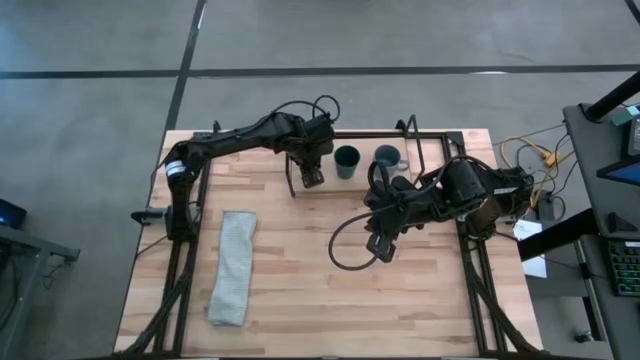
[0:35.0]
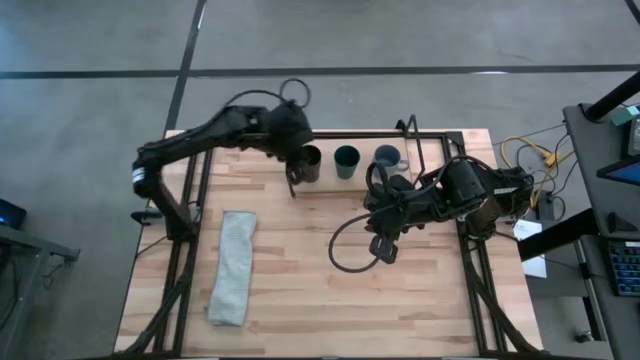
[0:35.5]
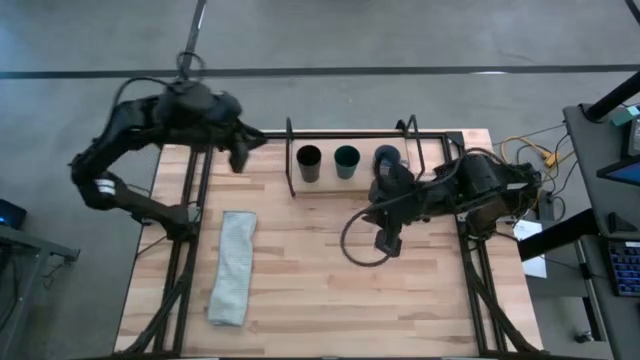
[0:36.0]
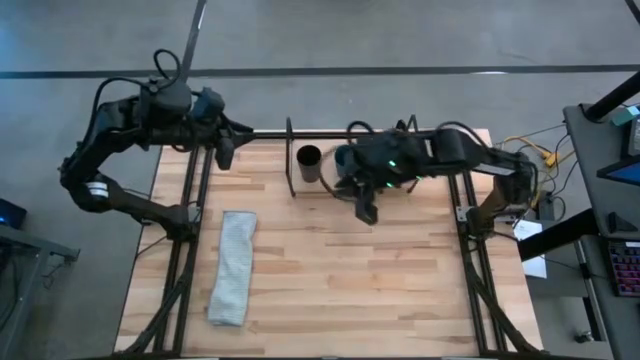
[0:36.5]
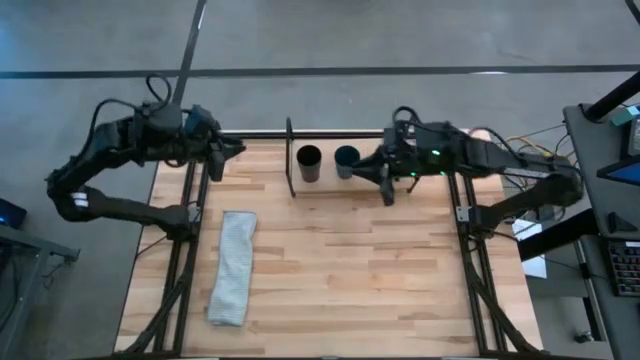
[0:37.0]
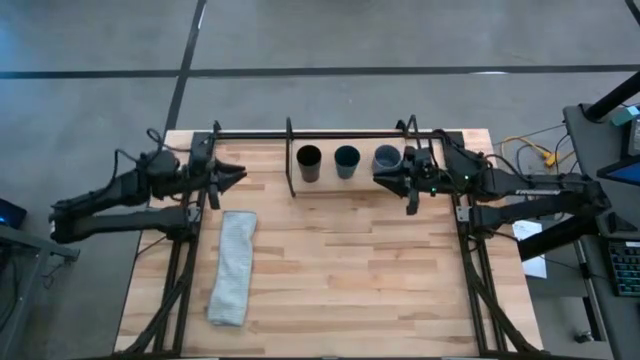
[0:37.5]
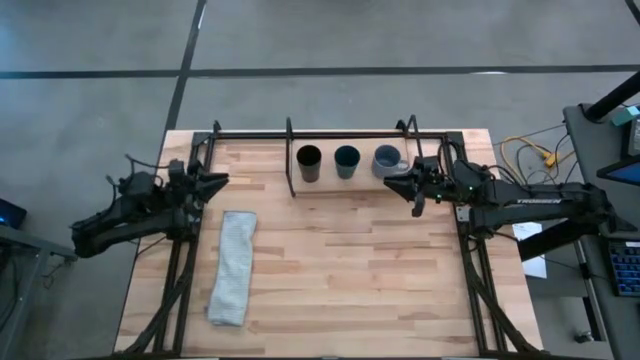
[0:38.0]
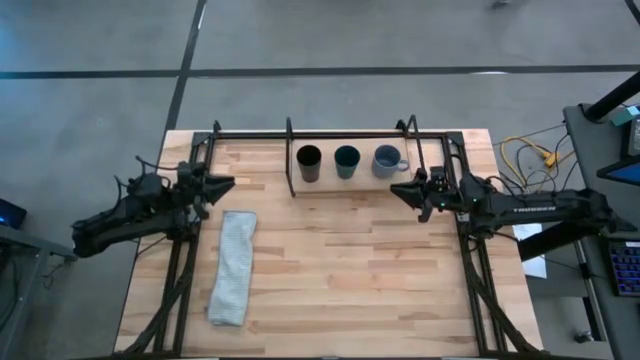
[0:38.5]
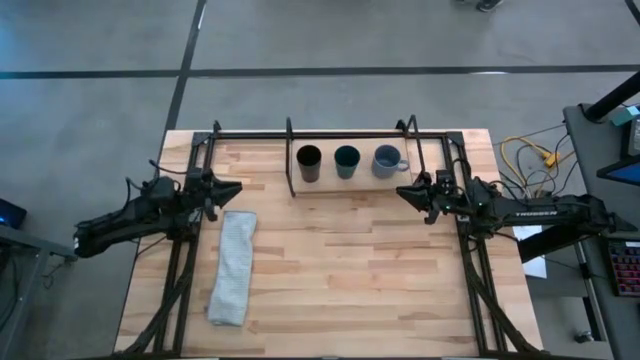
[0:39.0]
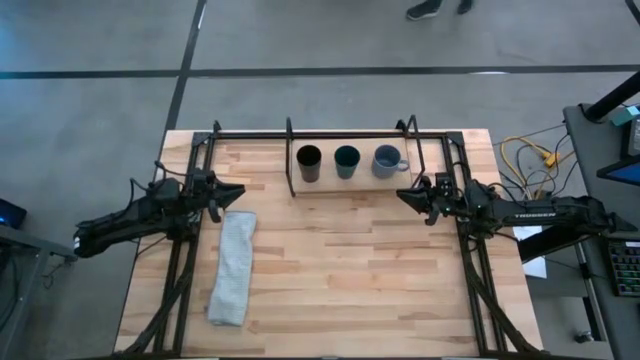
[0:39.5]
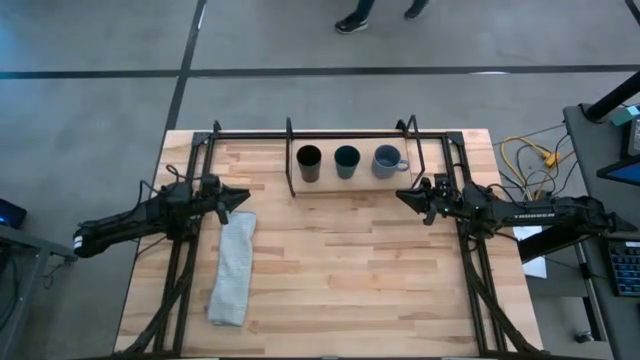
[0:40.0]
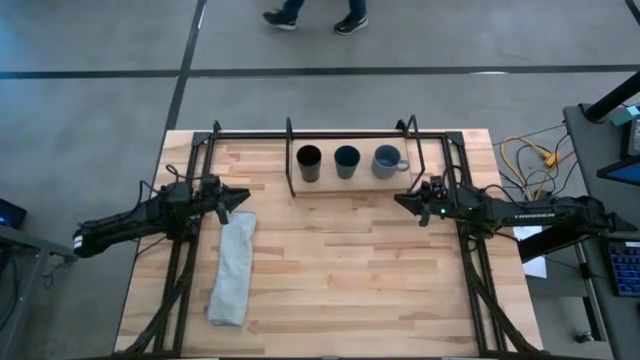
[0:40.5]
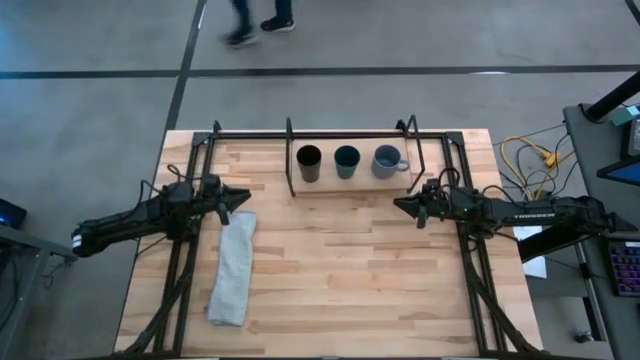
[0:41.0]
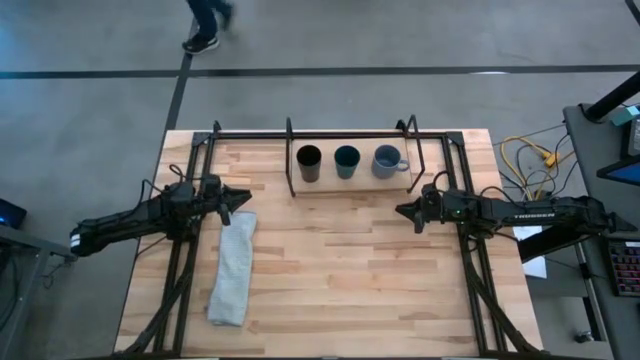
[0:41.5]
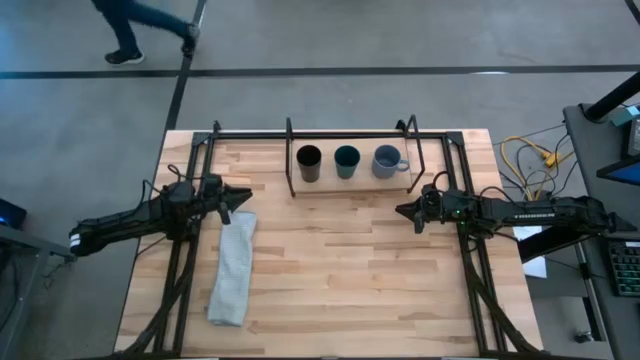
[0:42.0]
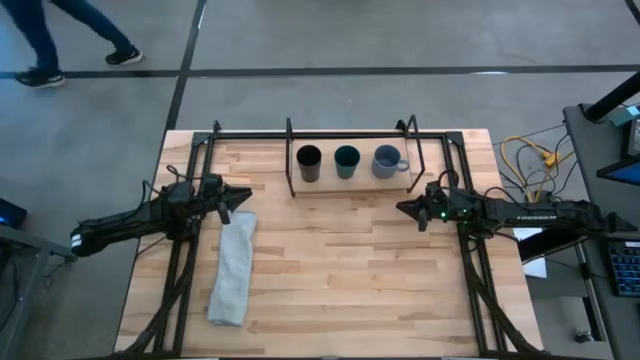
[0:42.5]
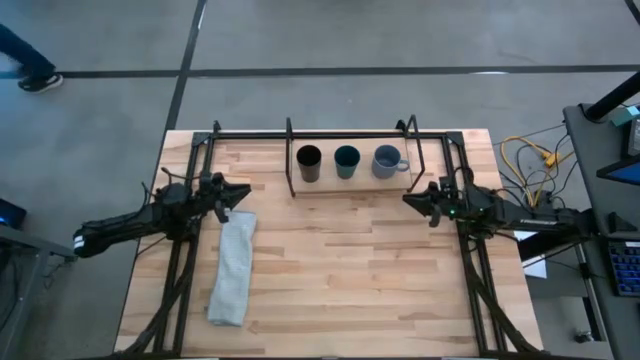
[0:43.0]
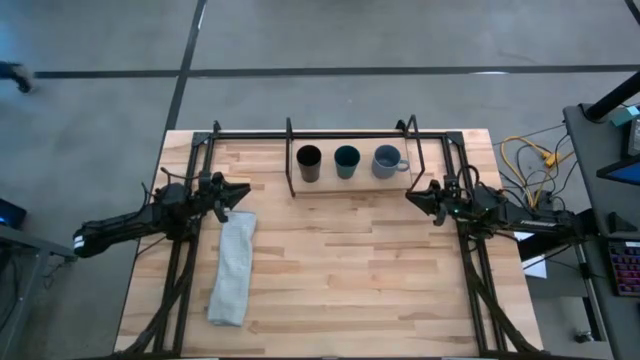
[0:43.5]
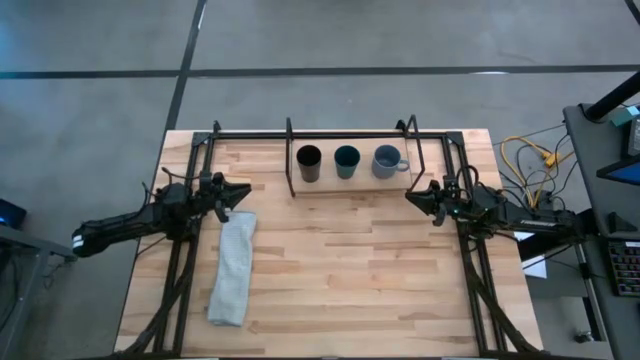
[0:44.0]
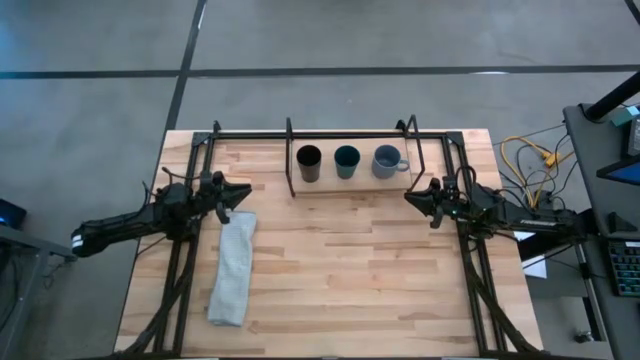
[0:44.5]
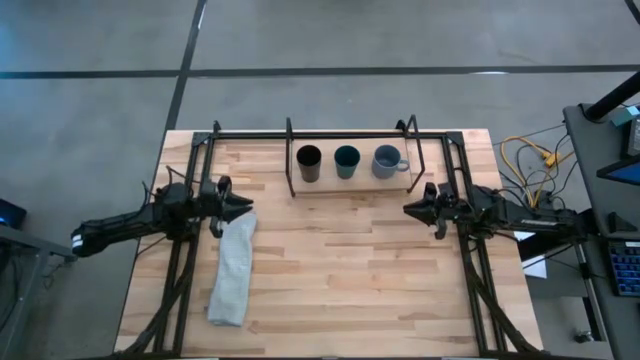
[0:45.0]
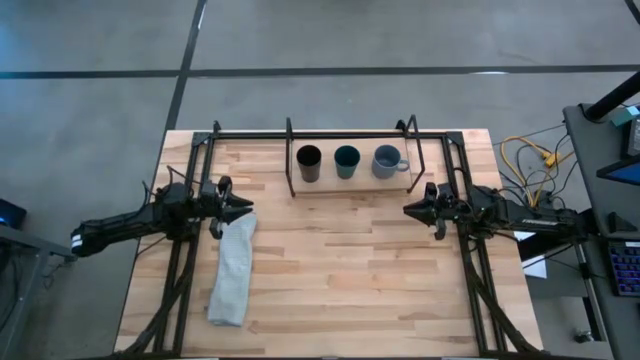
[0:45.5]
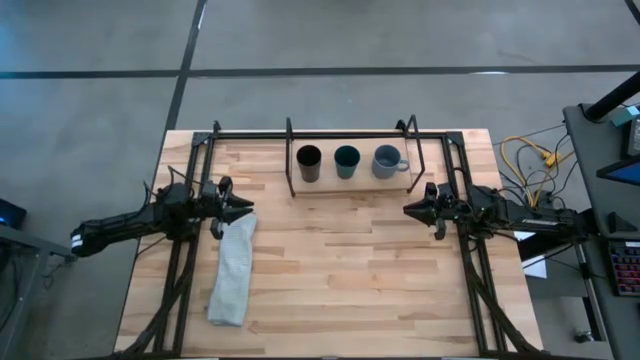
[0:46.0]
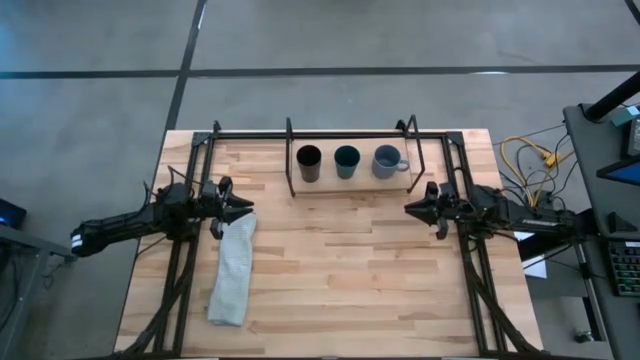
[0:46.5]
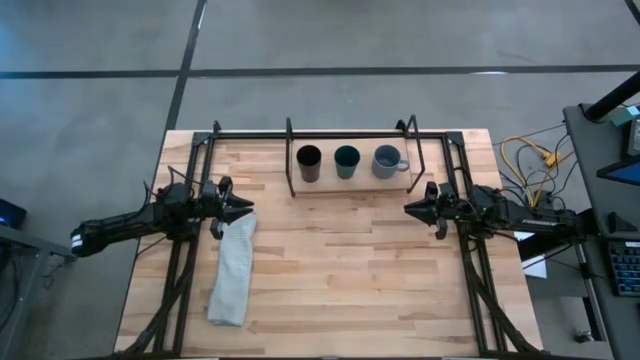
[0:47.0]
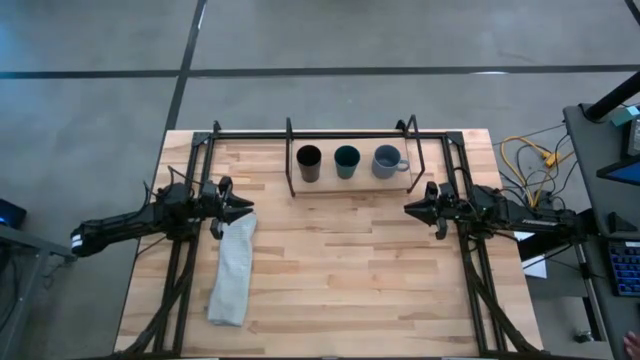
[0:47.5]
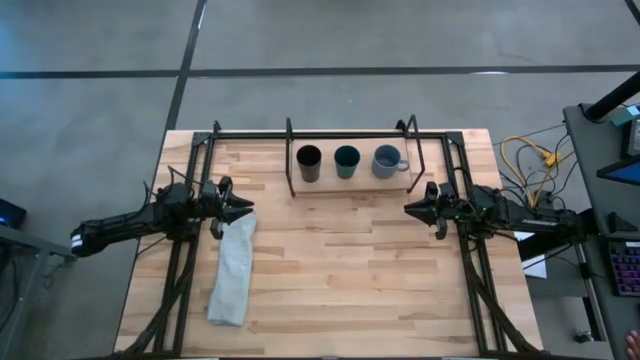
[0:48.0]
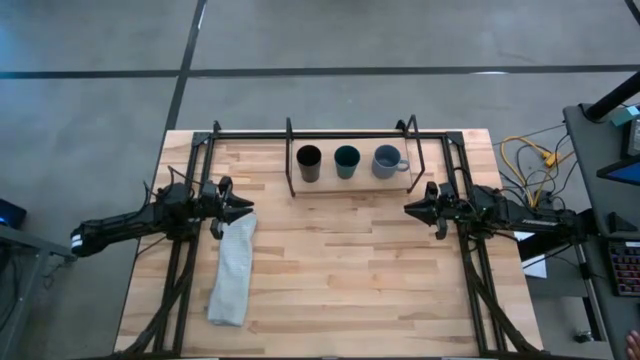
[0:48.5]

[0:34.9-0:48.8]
Task: Stack small to large cups/mugs on shelf
Return to Home Position

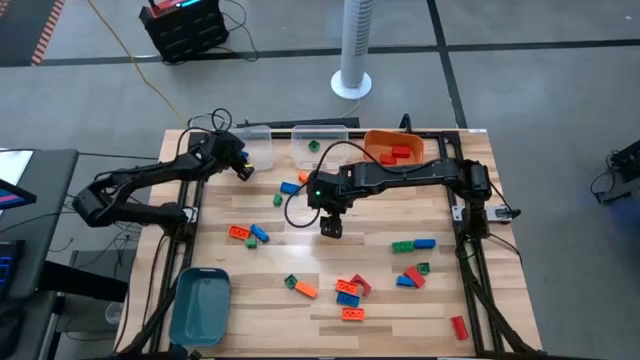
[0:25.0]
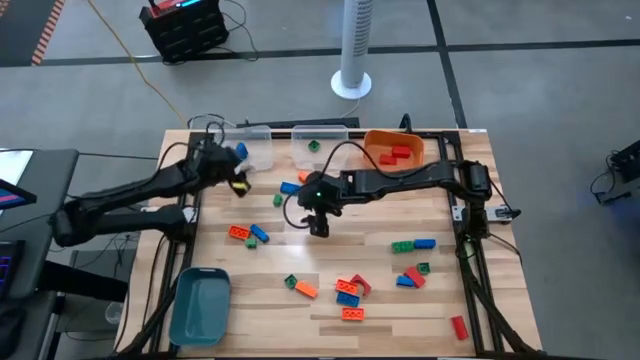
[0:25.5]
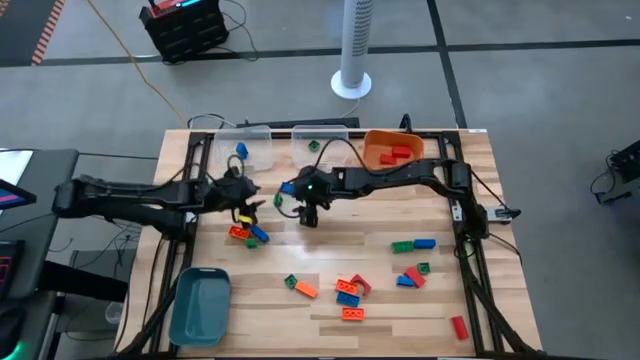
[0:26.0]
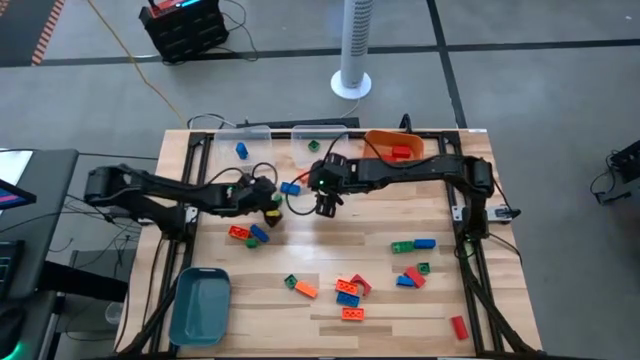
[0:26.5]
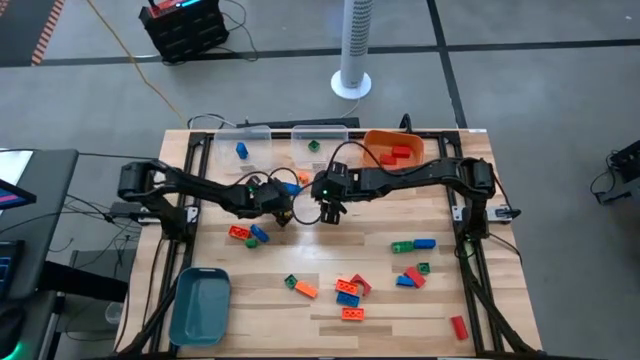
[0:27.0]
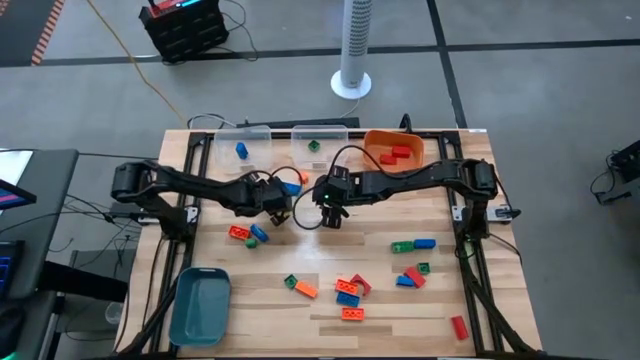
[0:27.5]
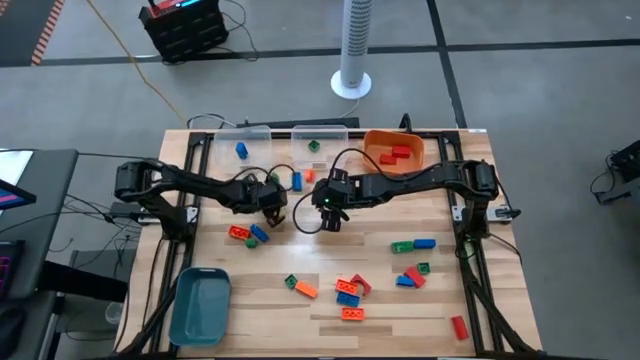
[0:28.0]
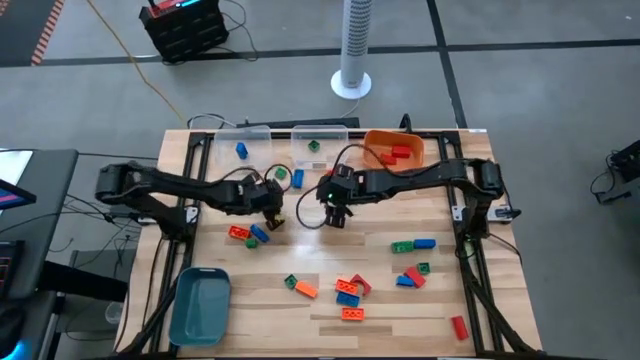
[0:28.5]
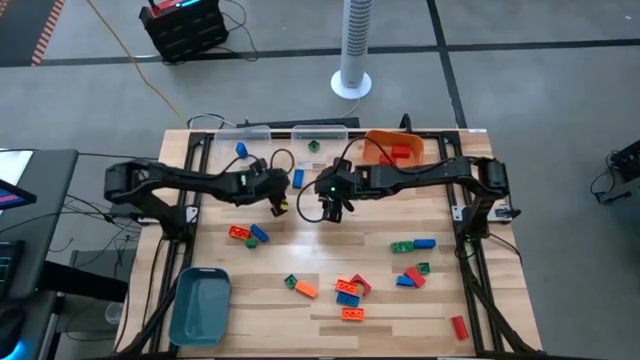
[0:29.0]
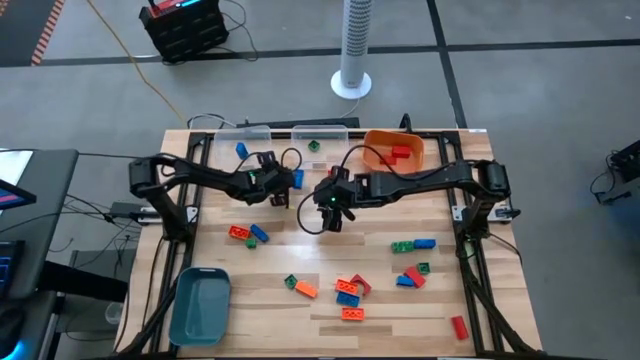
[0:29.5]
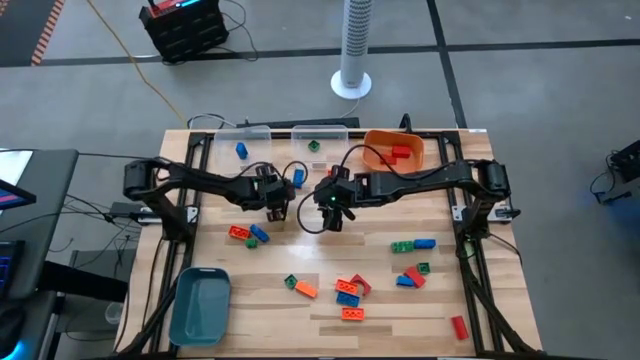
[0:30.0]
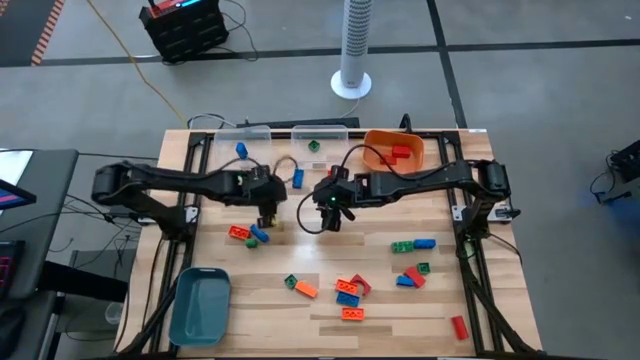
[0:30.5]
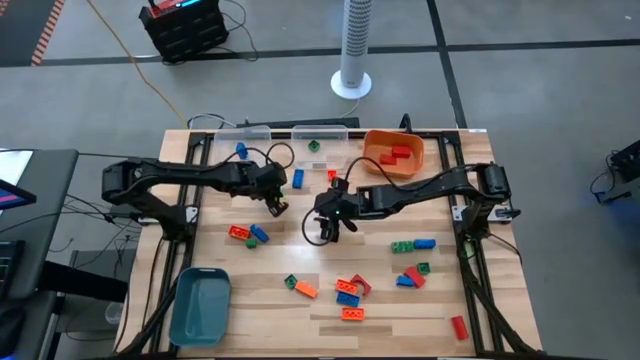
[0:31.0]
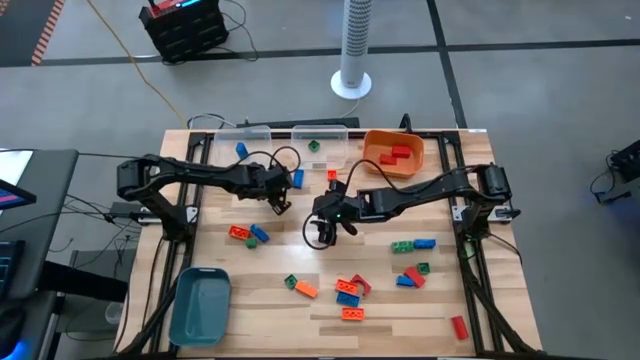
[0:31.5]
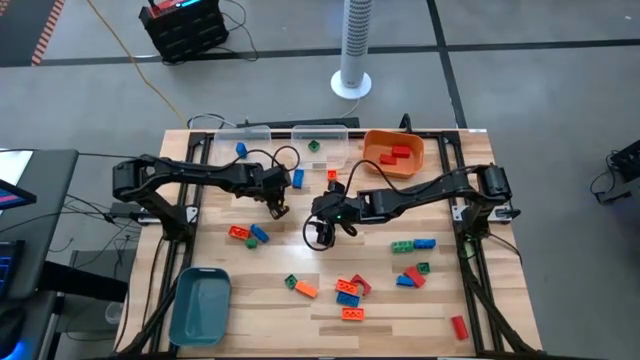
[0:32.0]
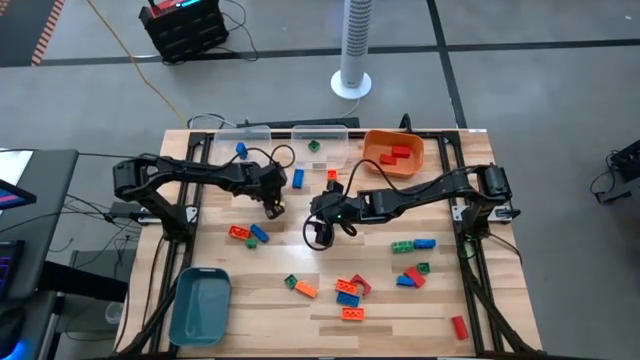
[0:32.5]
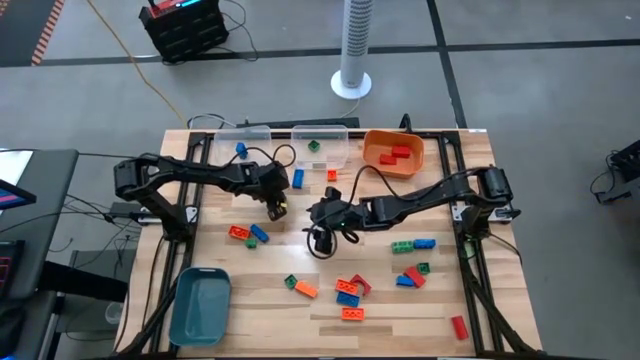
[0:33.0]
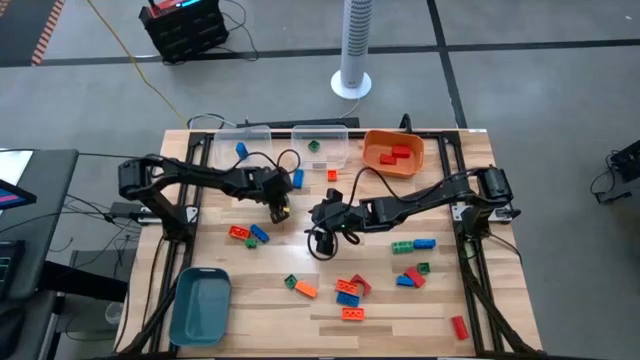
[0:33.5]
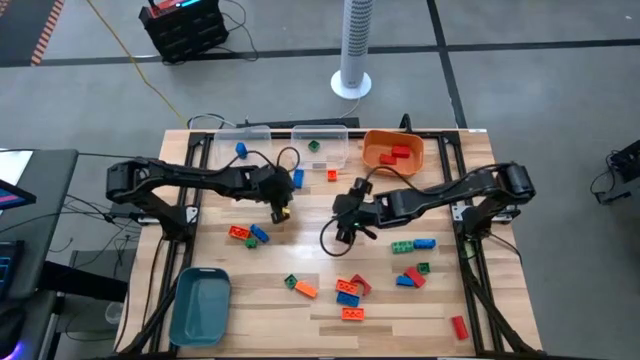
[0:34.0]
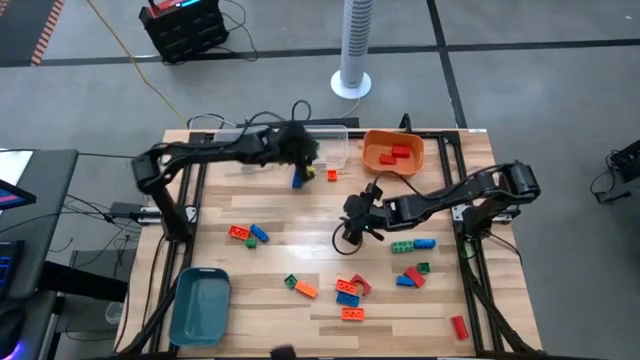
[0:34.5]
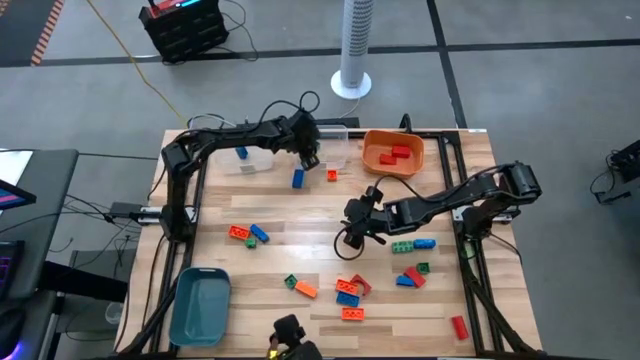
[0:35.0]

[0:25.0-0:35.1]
Task: Sort blocks
Put the green game piece into the right transparent bin
